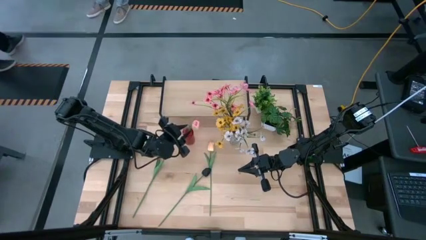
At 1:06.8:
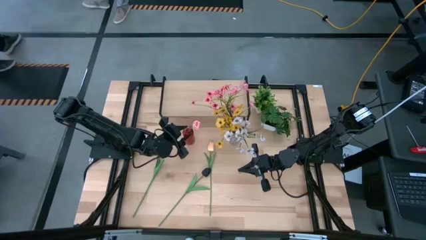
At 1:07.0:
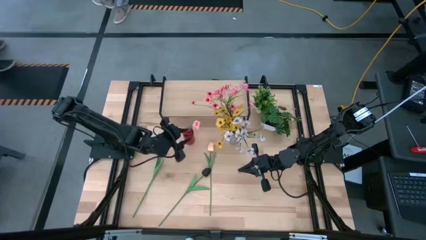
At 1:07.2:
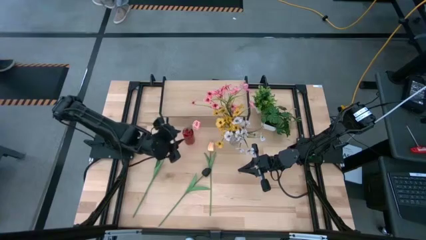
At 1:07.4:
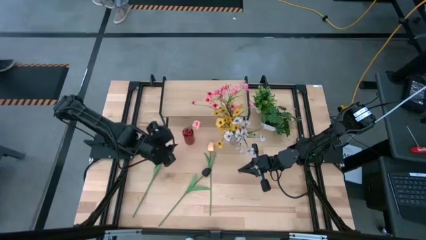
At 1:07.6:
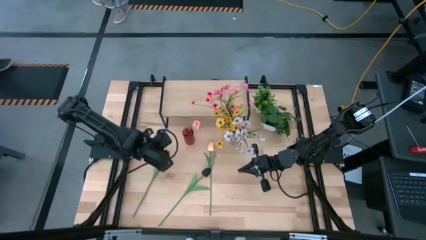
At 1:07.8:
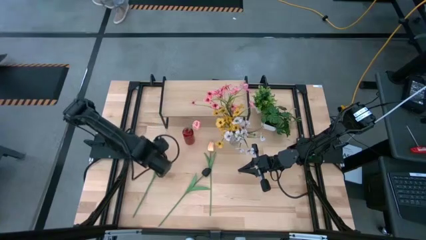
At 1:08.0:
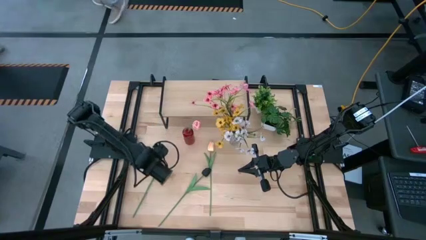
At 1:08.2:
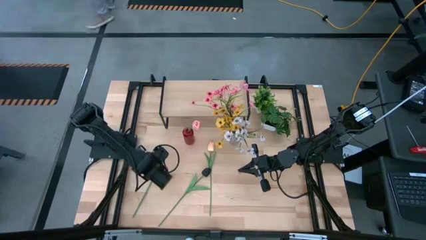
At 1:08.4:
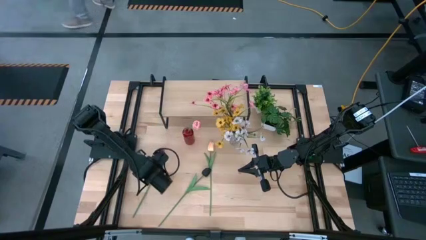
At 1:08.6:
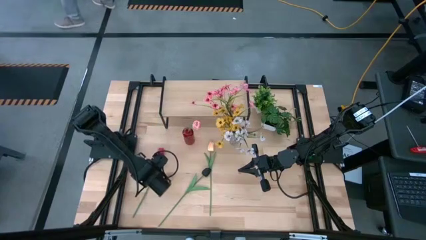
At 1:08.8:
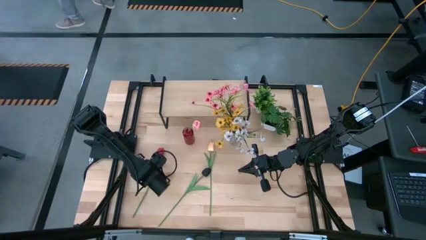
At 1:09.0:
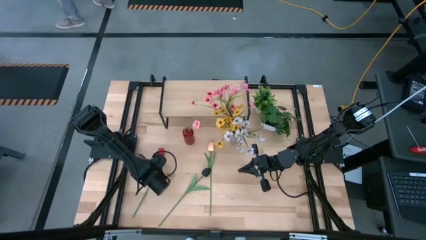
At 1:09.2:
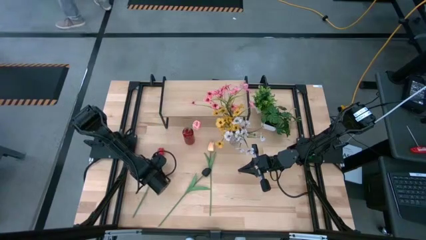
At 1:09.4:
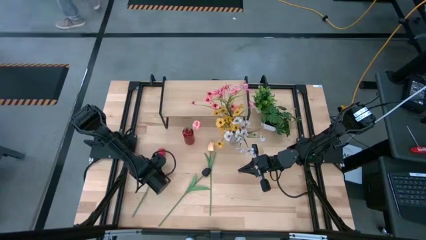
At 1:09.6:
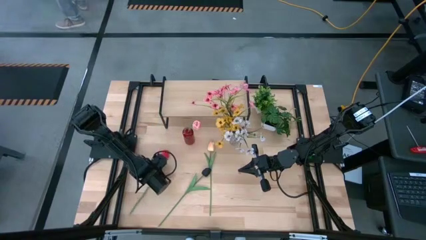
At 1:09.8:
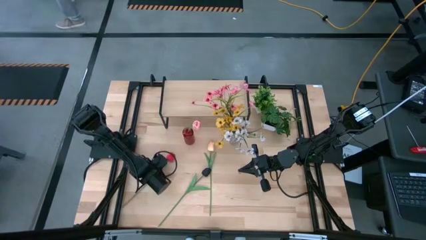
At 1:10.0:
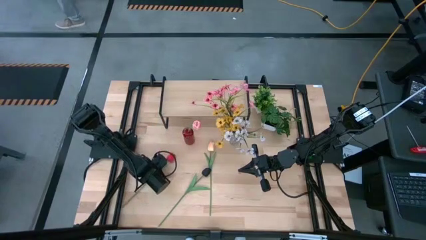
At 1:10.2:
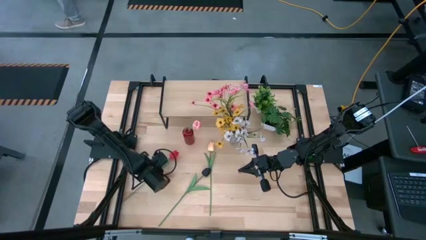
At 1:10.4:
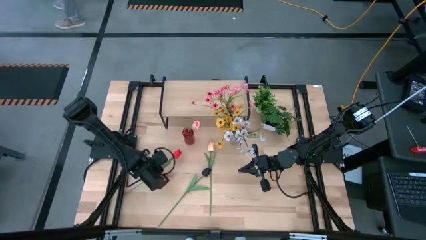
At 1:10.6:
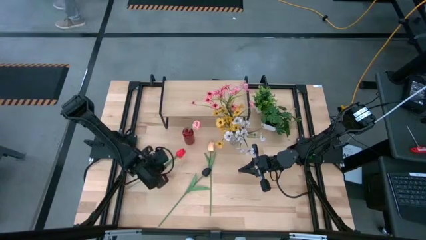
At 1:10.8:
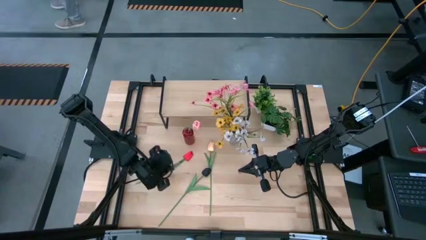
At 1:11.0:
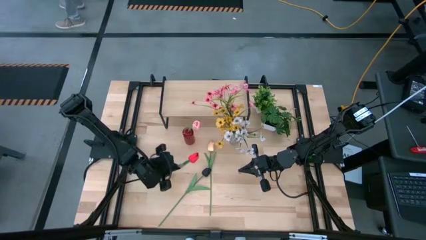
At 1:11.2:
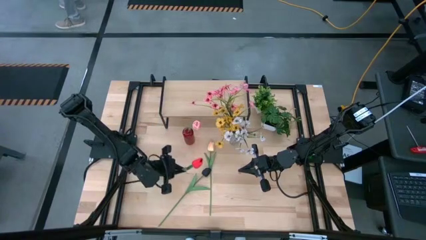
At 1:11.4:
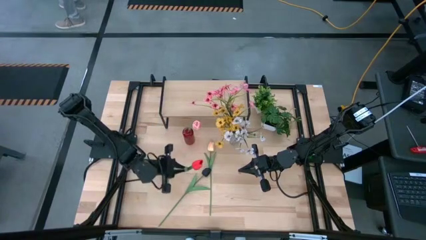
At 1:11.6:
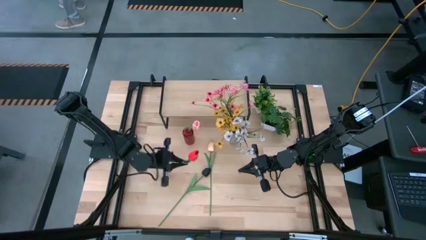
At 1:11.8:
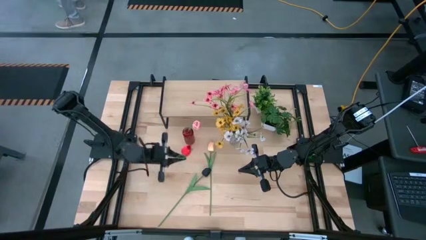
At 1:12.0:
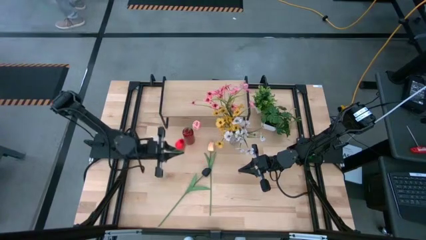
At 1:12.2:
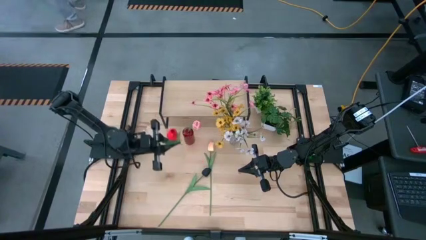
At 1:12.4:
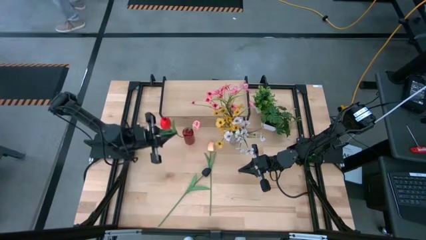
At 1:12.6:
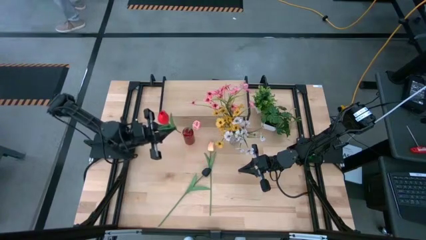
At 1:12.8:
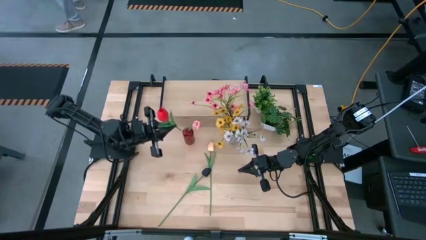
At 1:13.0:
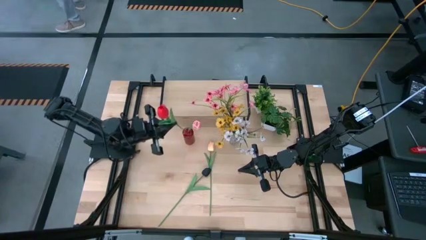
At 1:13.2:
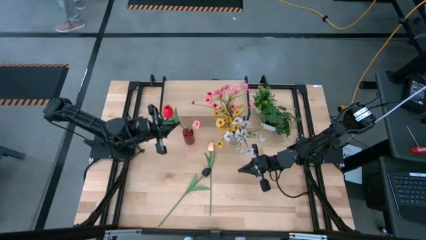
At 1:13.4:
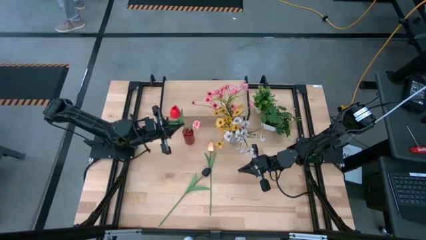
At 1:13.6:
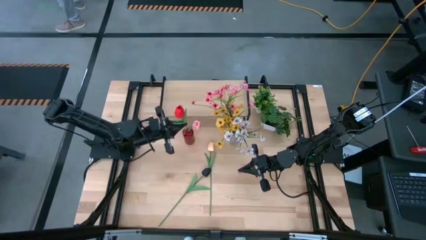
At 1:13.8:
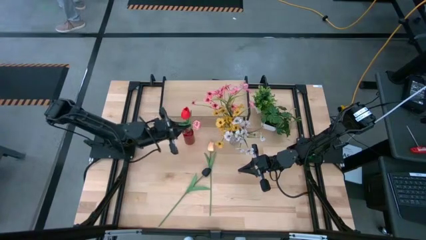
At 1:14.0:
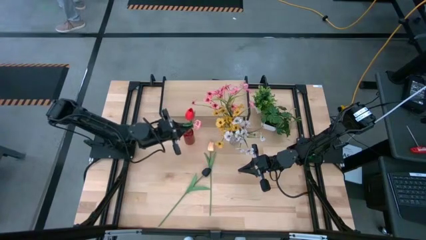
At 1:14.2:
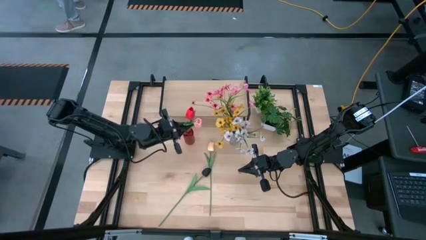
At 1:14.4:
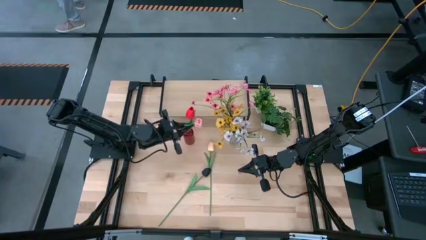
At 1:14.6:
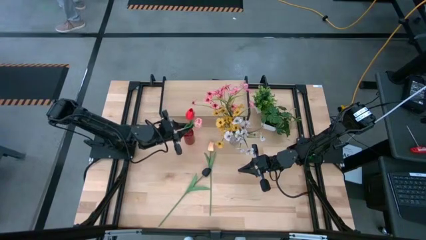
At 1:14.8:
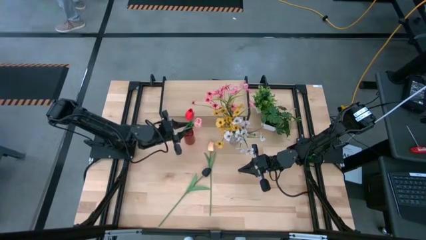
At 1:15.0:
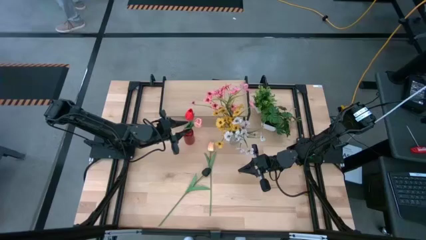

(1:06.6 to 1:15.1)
Task: Pick and place flowers into a vace then onto a shelf
Put the red flower into the red flower vase

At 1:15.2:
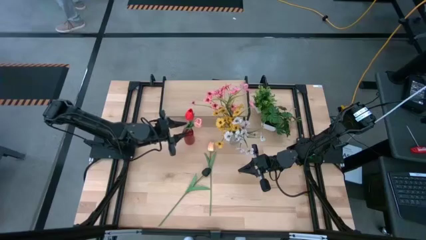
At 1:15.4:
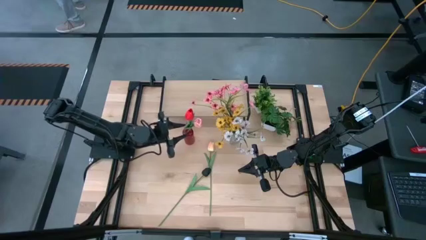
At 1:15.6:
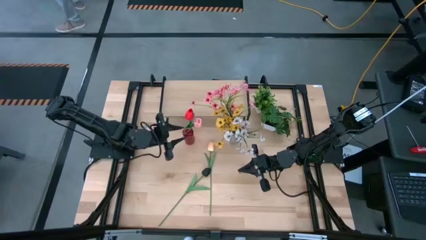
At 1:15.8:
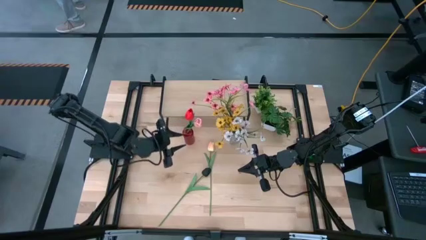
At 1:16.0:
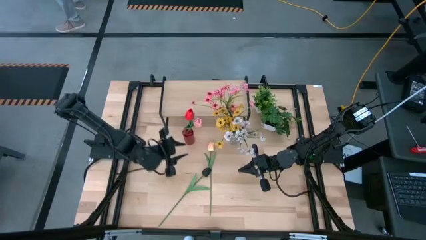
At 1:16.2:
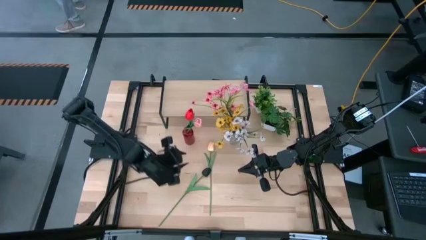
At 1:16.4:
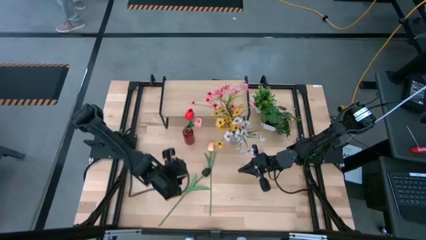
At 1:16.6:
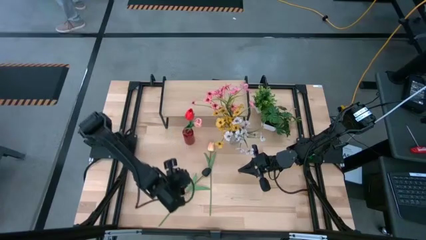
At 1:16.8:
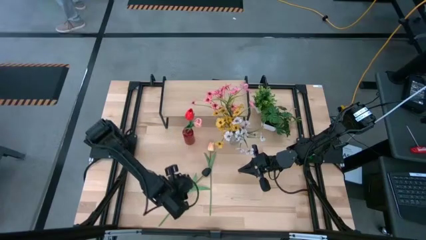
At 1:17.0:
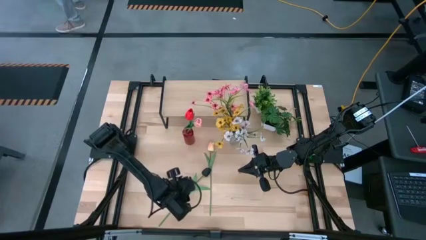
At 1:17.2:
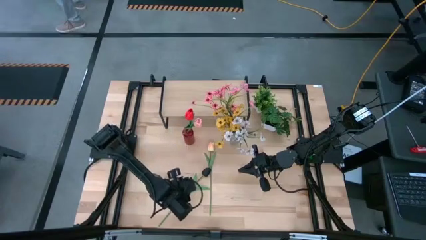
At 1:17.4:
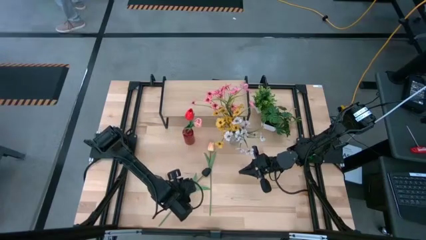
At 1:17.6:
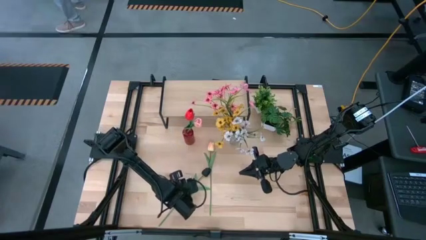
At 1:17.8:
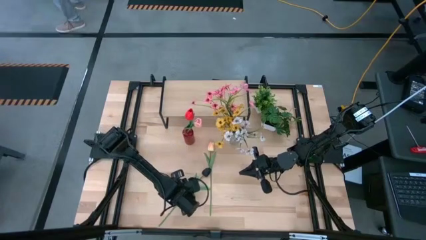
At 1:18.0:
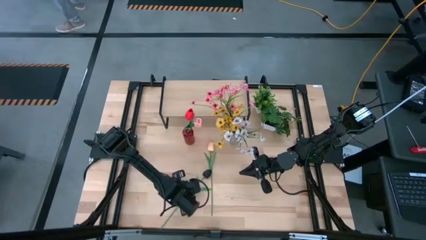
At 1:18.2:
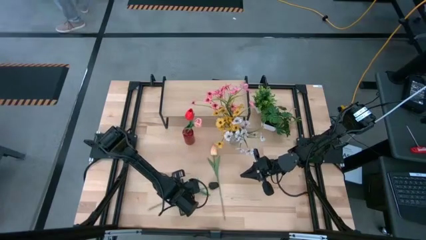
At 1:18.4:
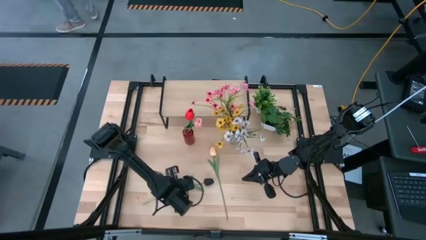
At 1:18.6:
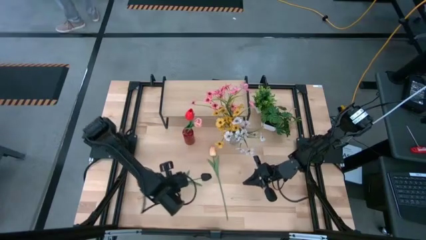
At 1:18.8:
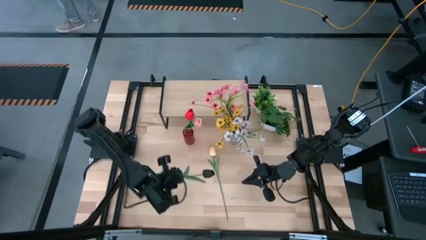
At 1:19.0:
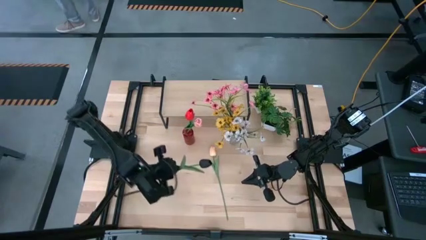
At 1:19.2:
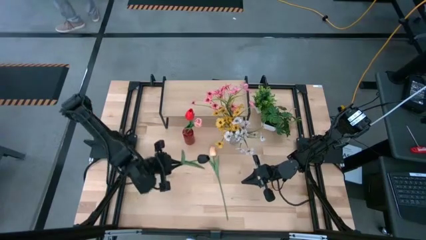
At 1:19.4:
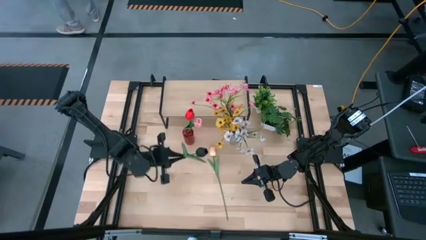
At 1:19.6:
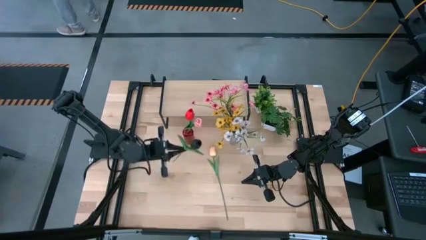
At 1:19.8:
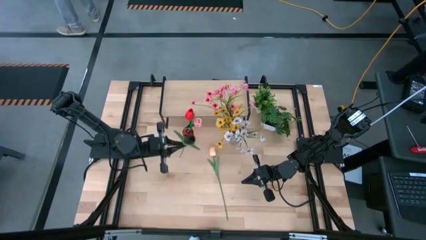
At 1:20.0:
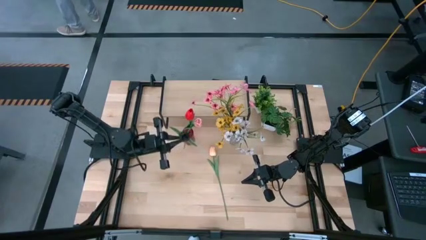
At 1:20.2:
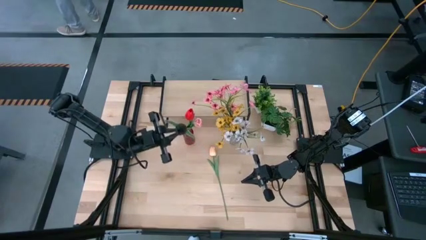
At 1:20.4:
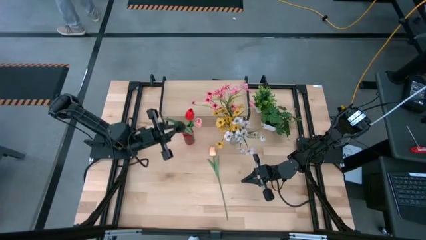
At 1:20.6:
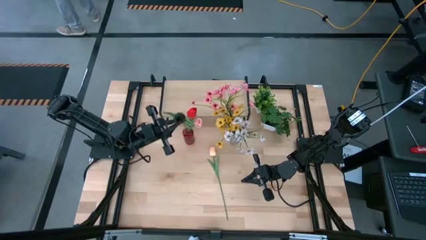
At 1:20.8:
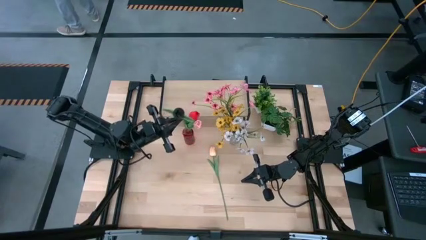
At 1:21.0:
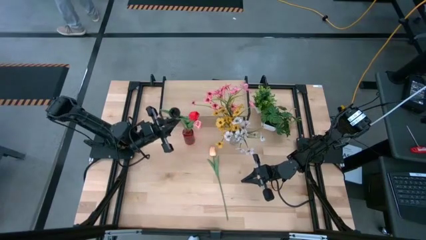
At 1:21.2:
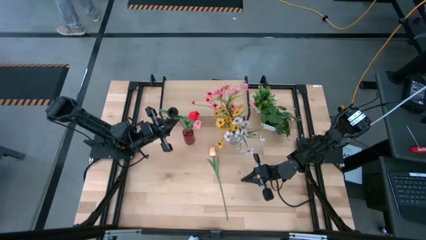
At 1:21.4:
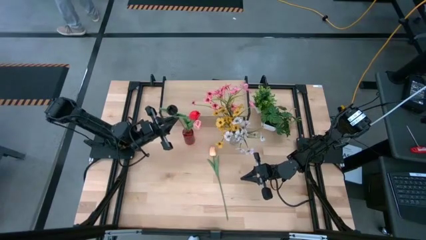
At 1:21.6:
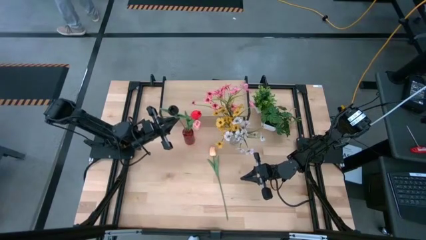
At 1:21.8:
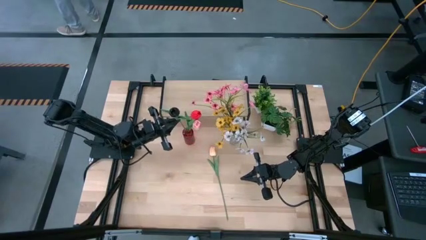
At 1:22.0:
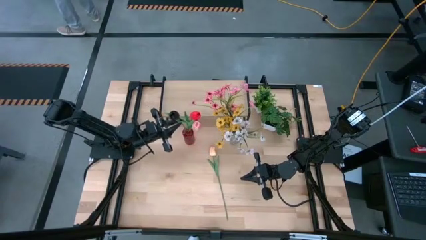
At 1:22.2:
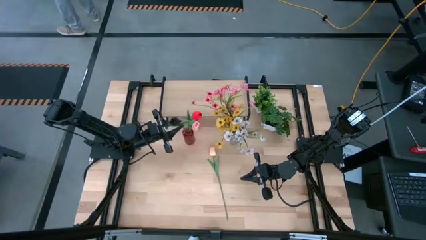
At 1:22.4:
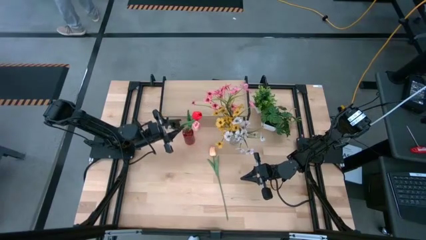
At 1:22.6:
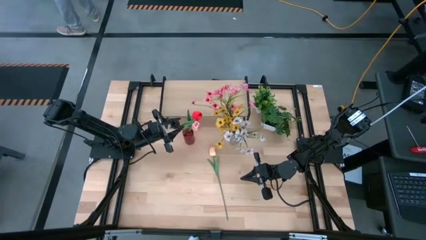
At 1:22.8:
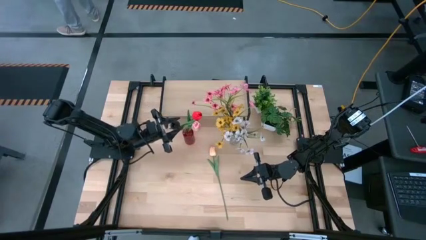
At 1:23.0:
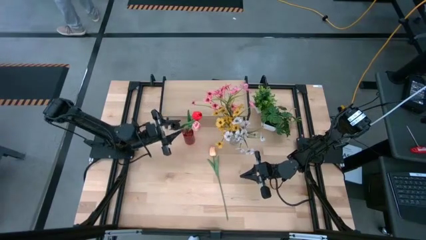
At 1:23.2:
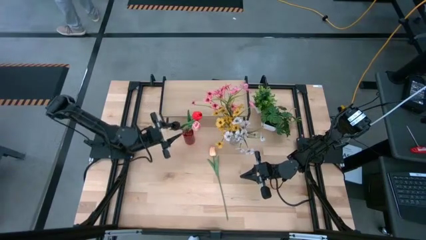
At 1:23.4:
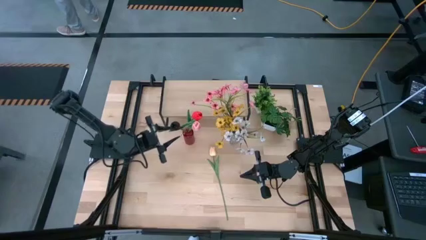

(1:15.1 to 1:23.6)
Put the black flower into the red flower vase
